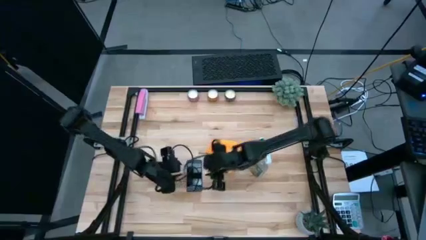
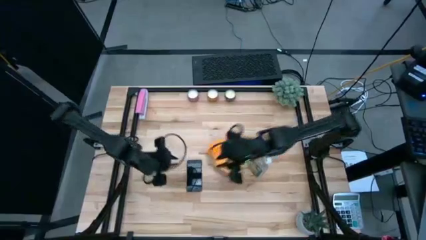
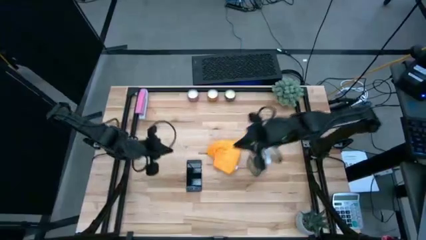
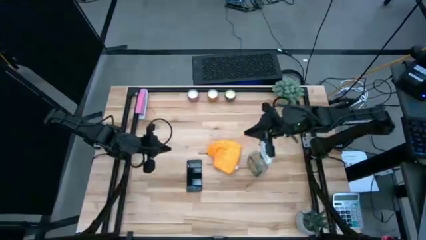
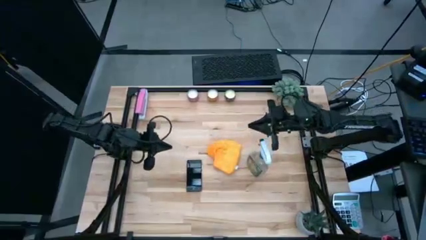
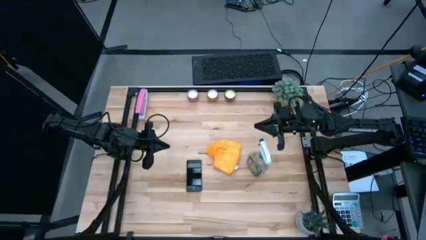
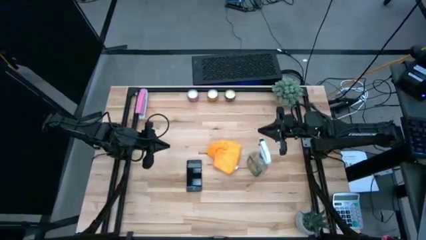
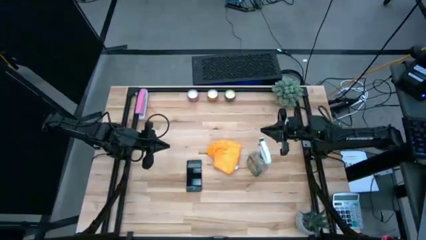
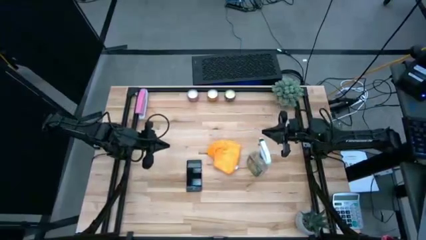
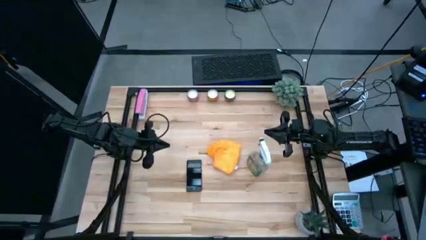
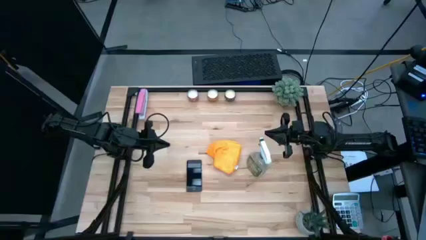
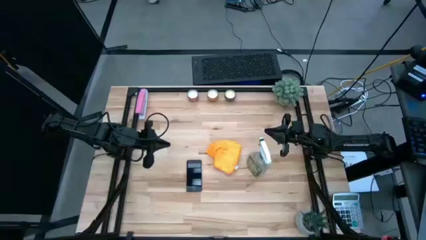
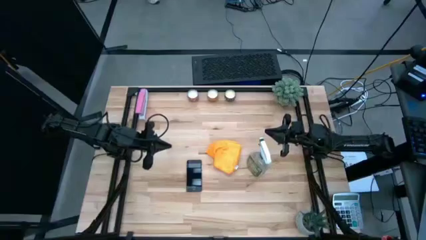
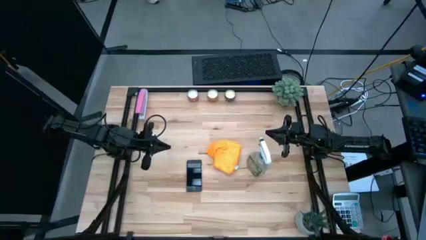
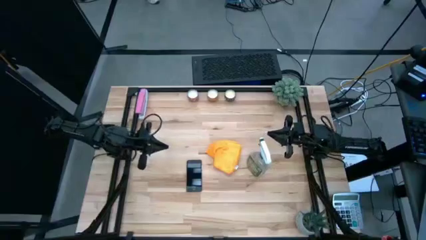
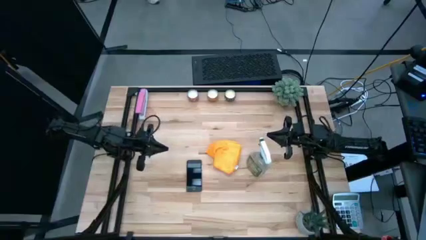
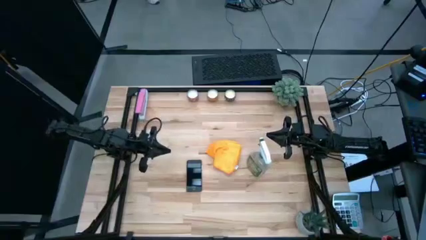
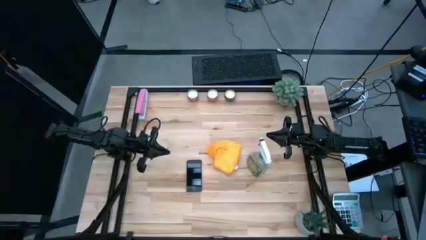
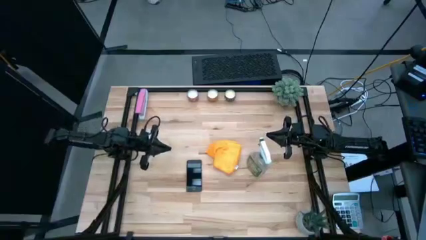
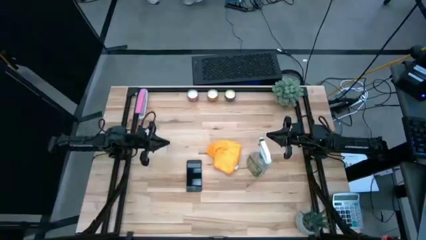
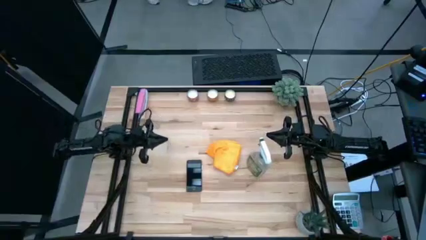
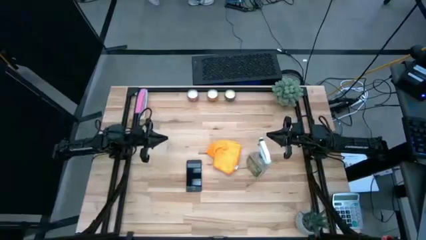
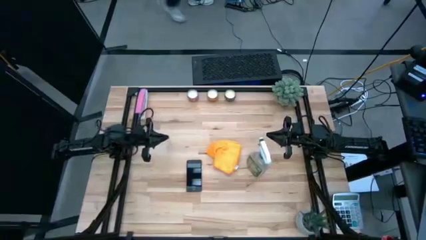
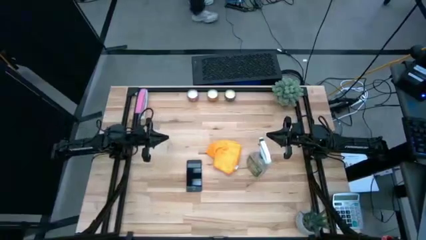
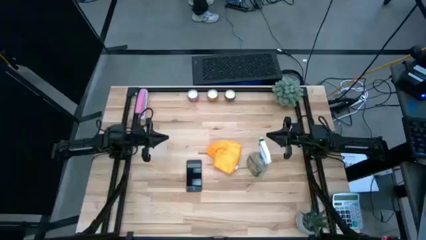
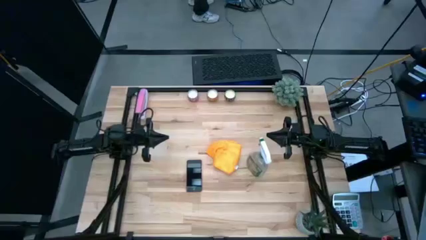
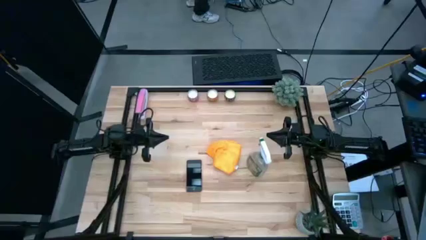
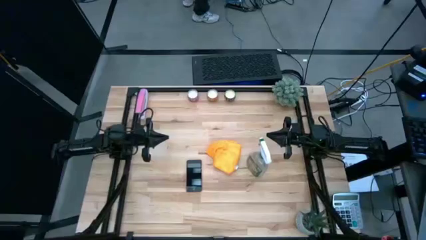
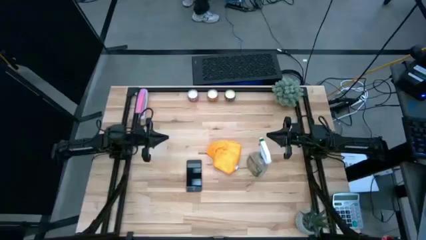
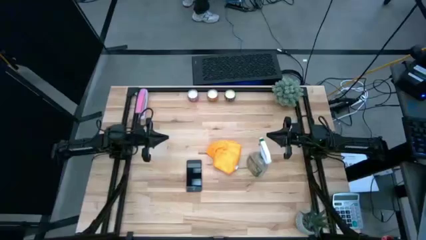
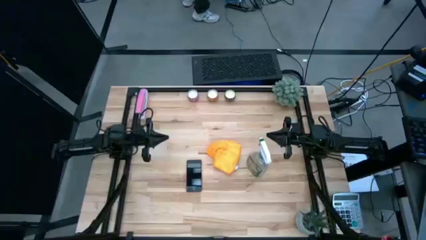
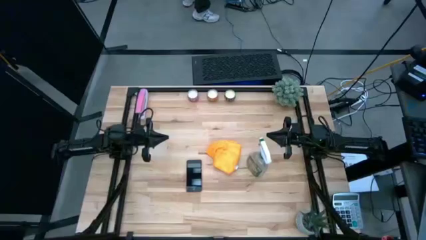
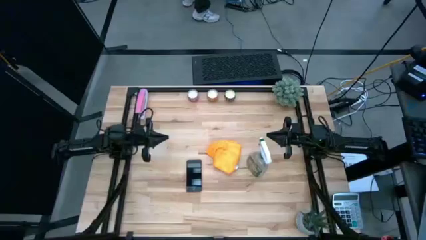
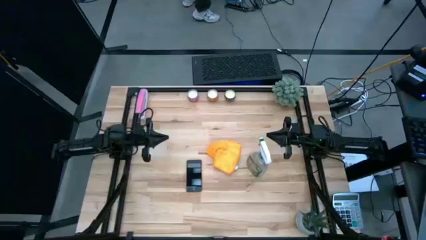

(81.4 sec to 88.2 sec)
Task: Apply microfiber cloth
Return to Home Position

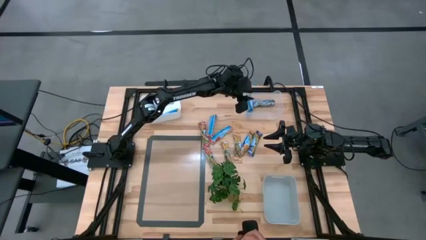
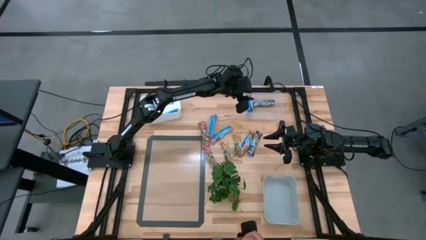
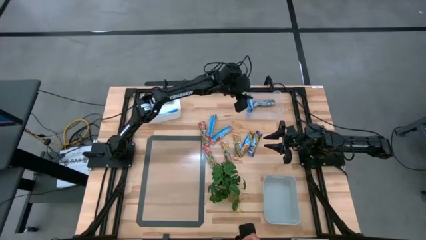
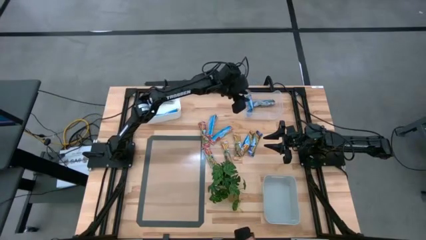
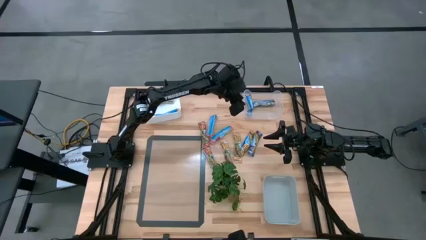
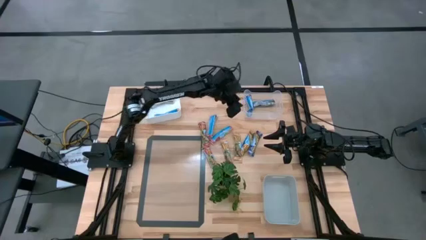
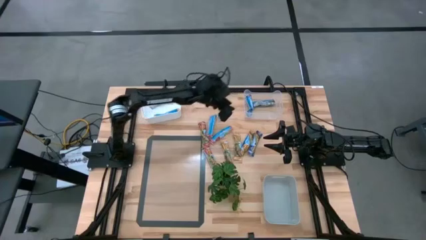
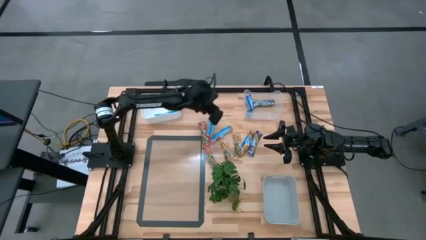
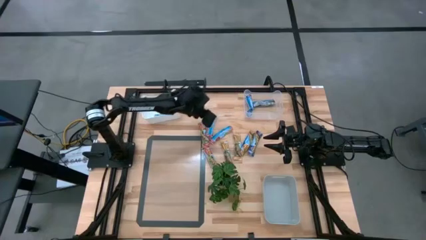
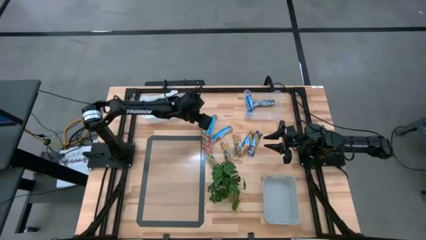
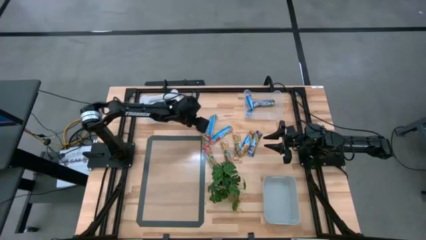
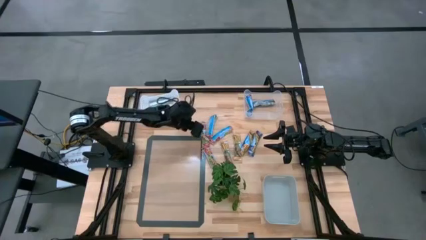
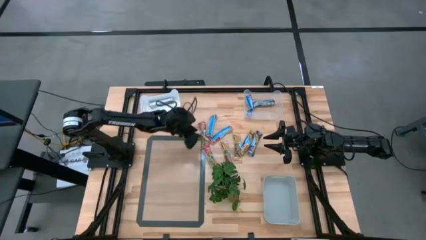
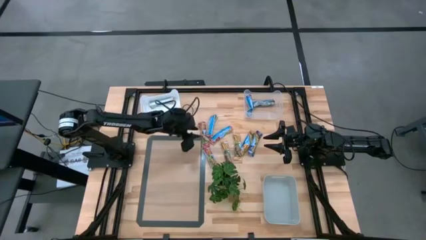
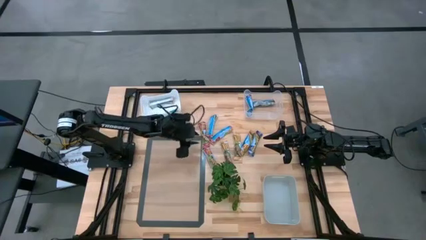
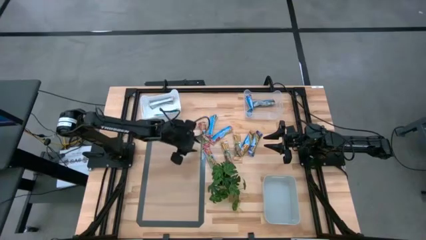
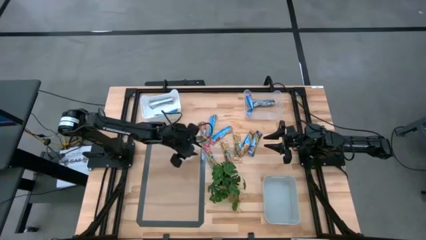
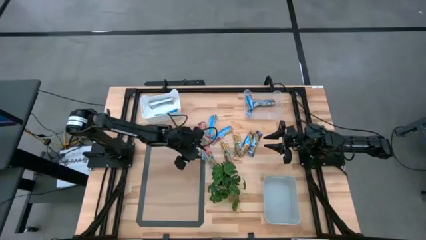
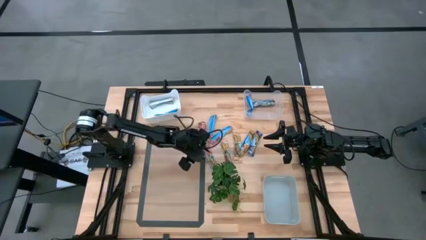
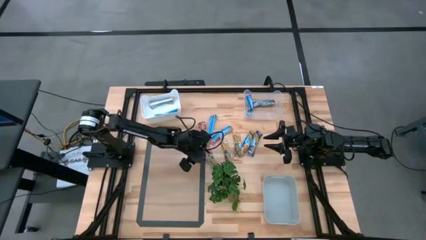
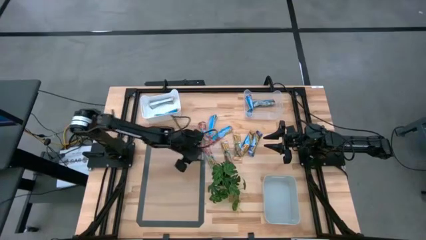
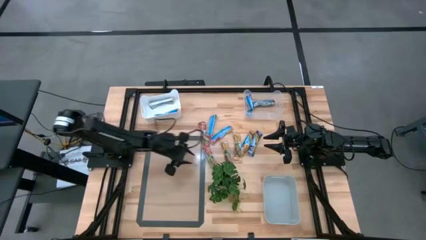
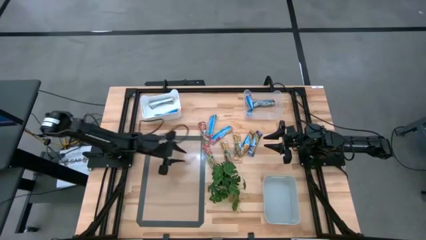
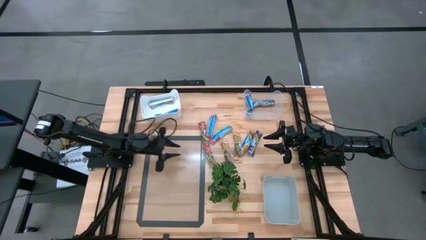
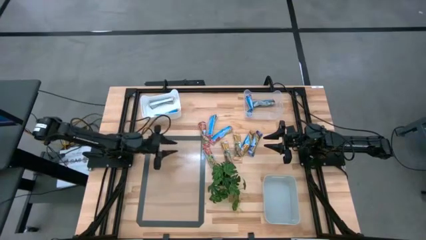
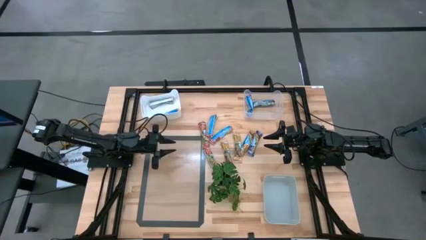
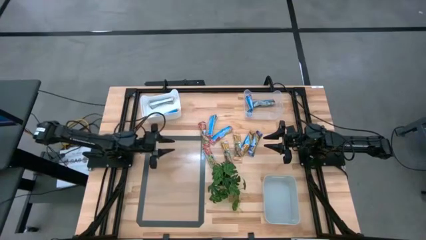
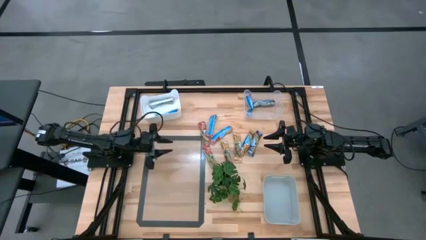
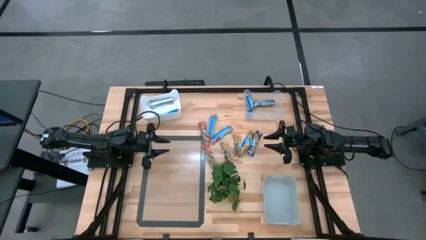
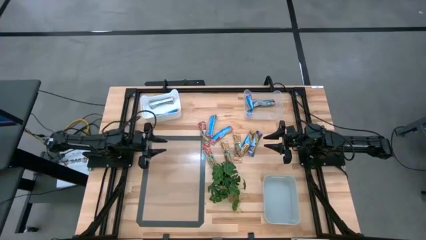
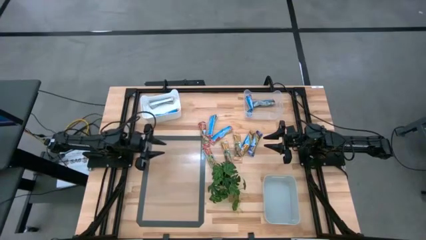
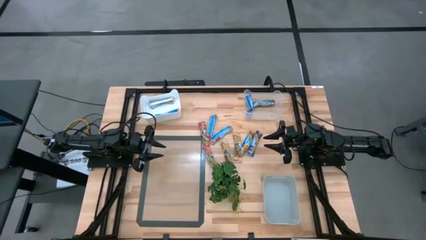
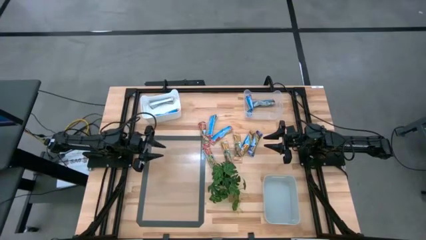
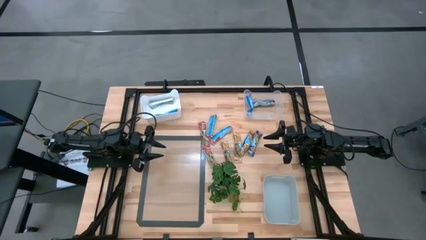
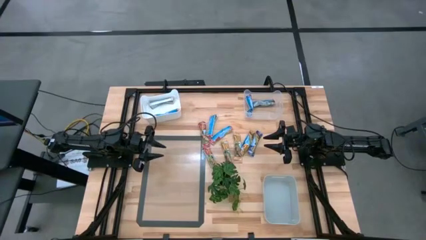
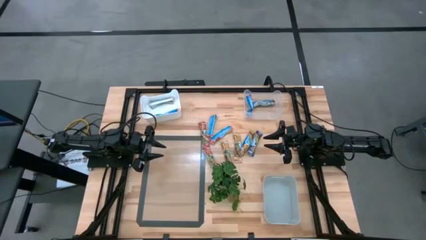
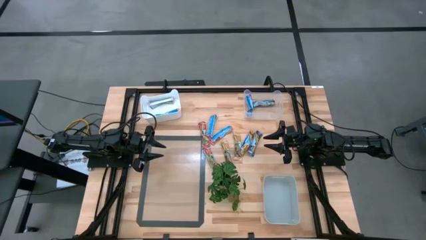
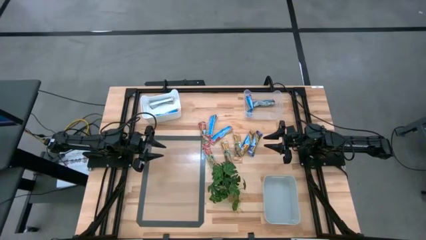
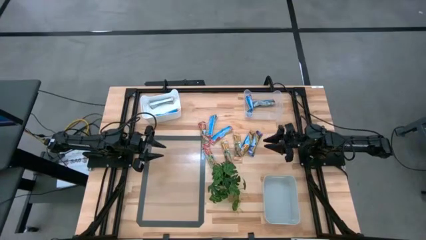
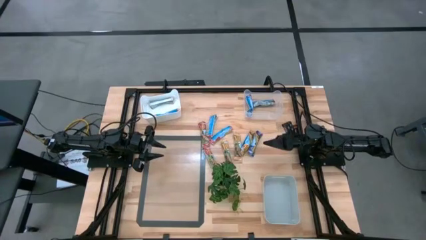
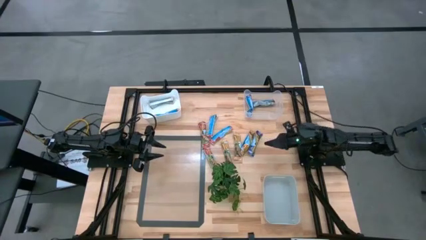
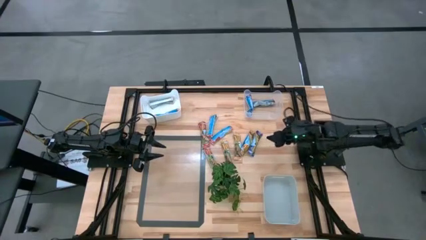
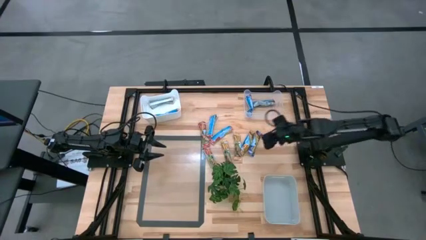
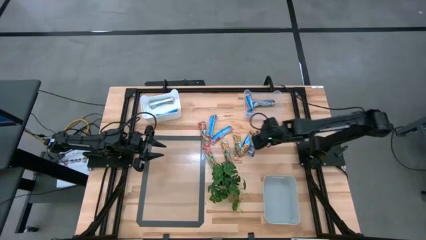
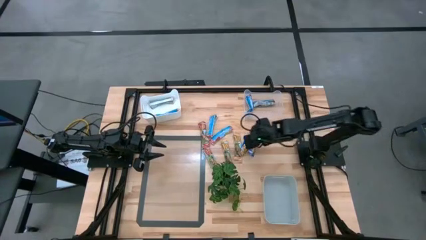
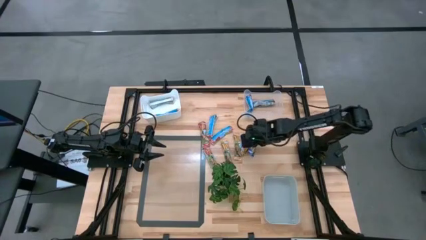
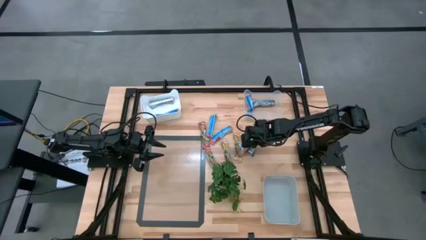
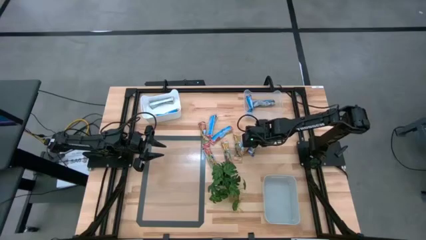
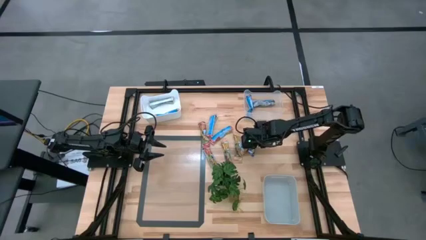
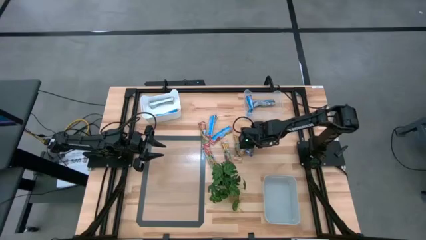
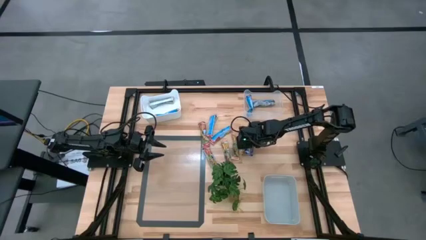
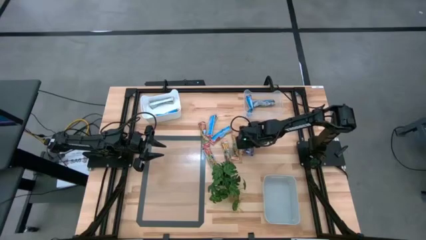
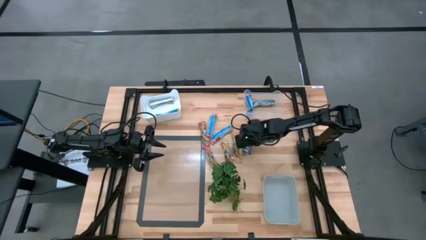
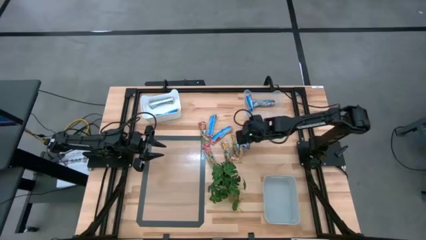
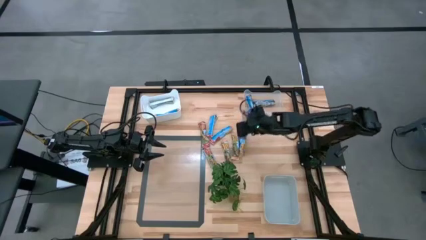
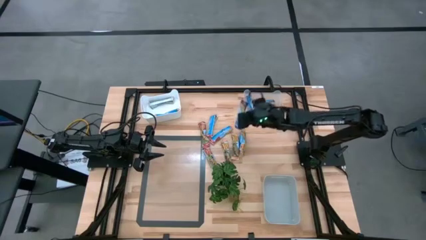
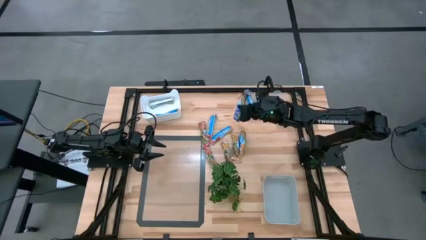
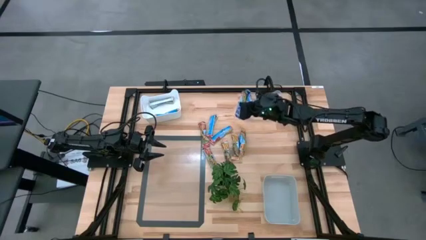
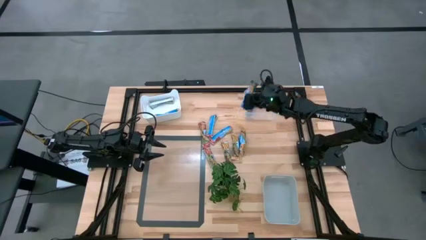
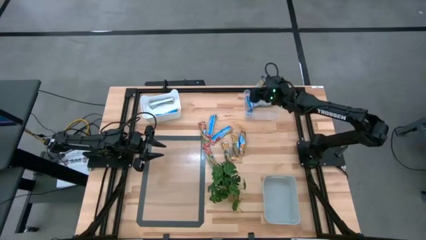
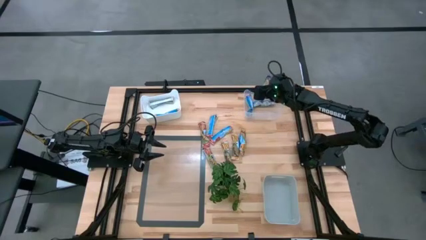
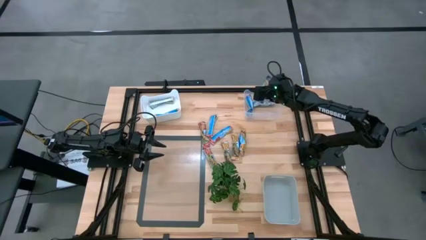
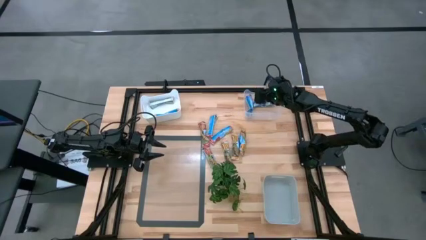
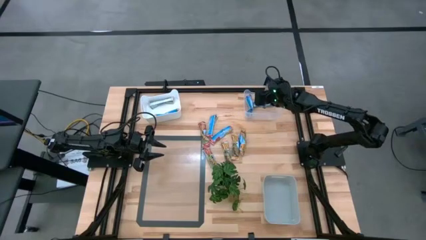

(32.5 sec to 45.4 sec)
Task: Pick and place Granola Bars by type
Put the blue granola bar into the transparent bin
